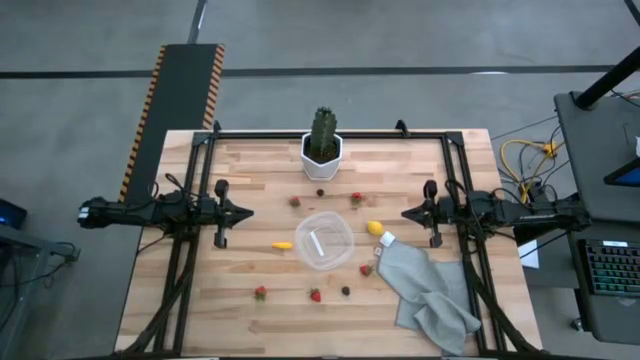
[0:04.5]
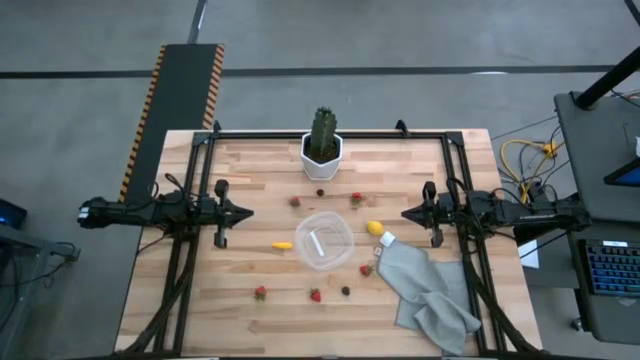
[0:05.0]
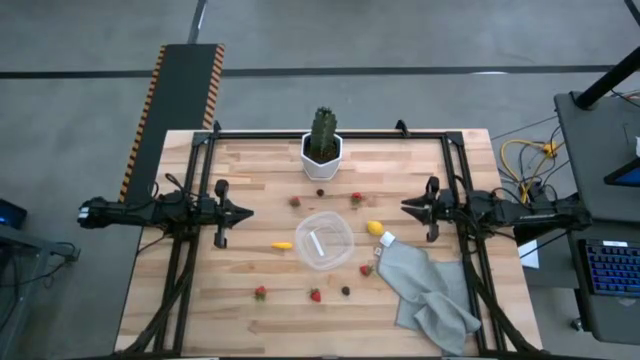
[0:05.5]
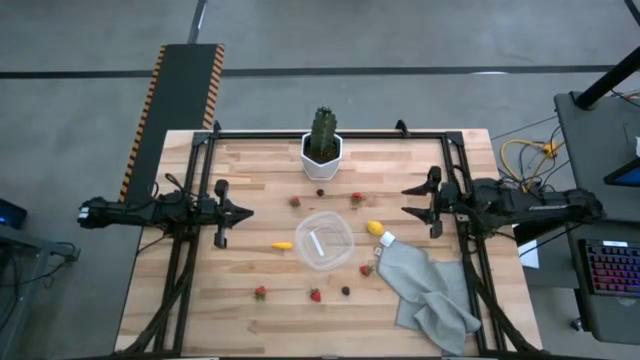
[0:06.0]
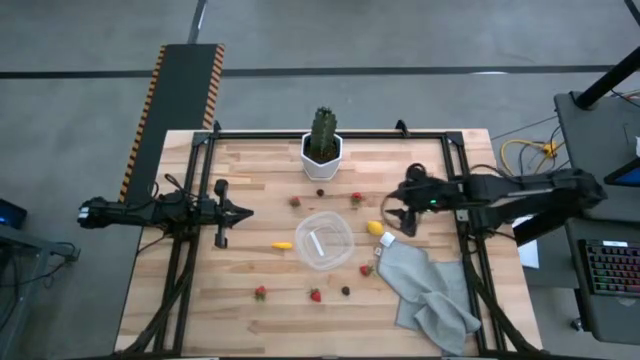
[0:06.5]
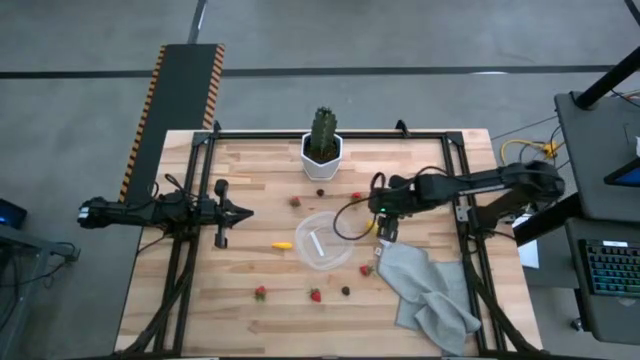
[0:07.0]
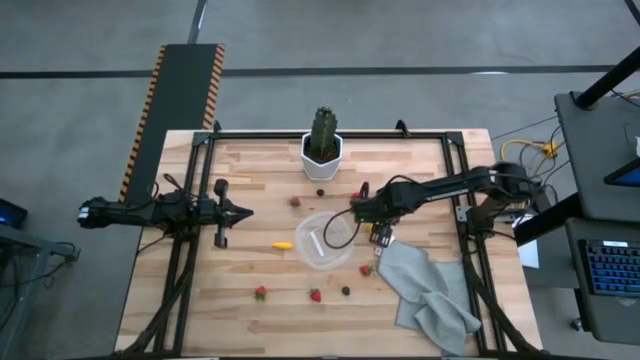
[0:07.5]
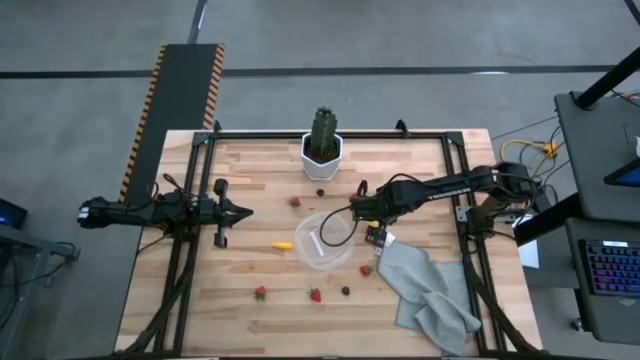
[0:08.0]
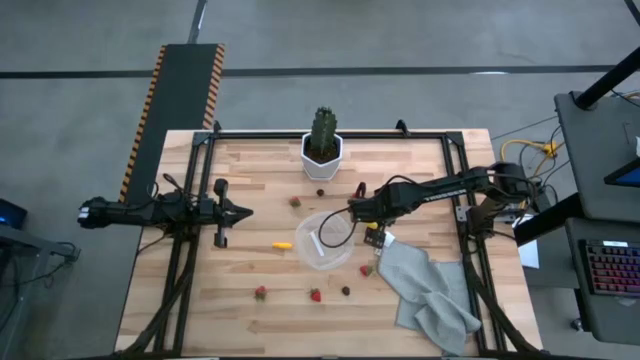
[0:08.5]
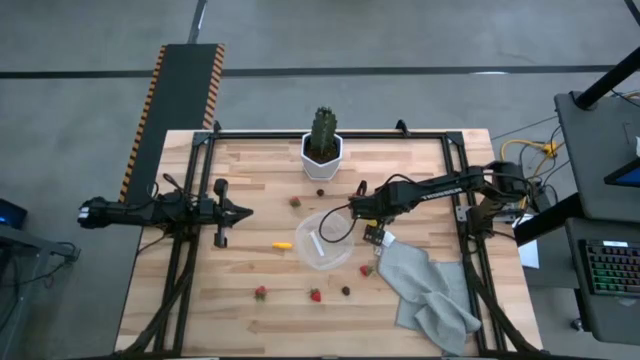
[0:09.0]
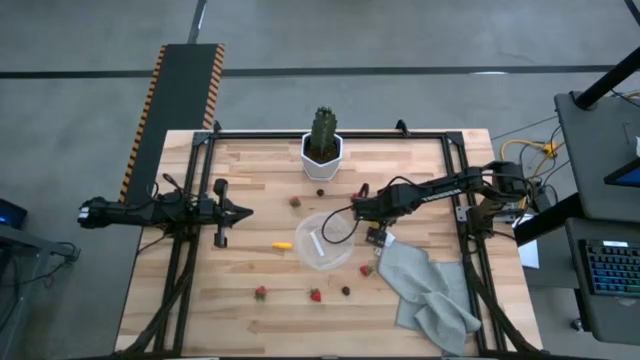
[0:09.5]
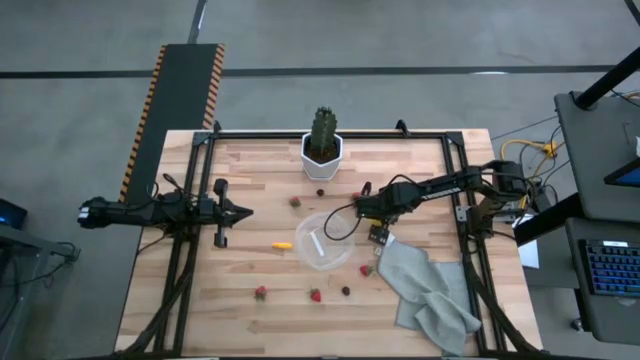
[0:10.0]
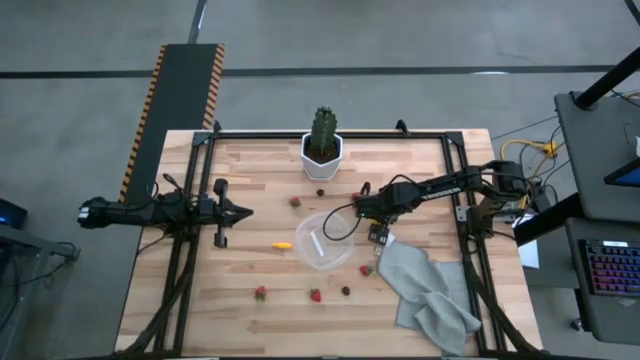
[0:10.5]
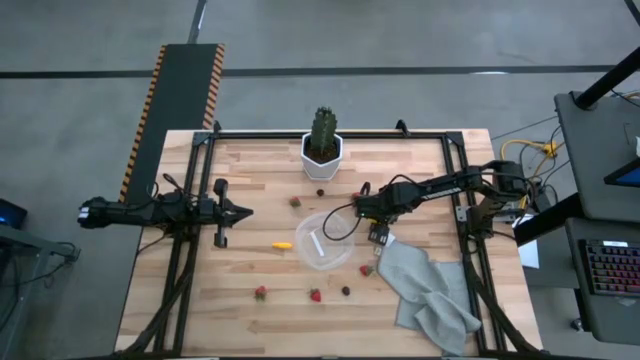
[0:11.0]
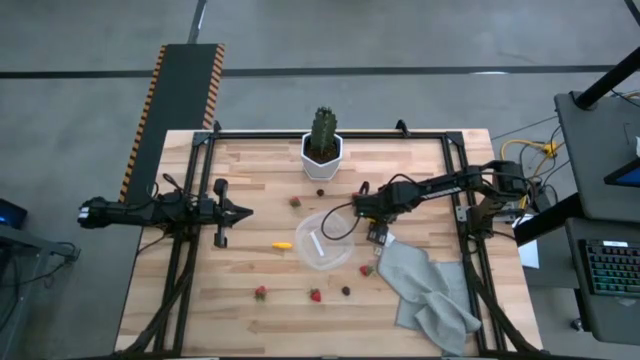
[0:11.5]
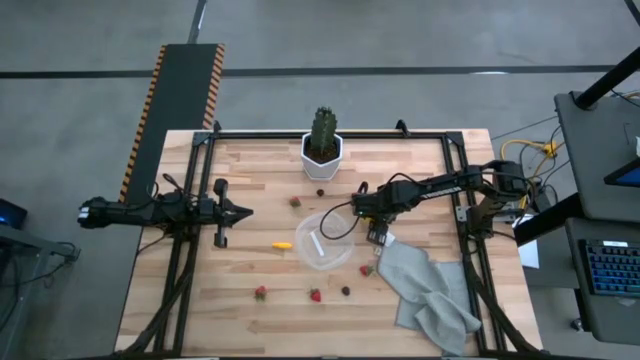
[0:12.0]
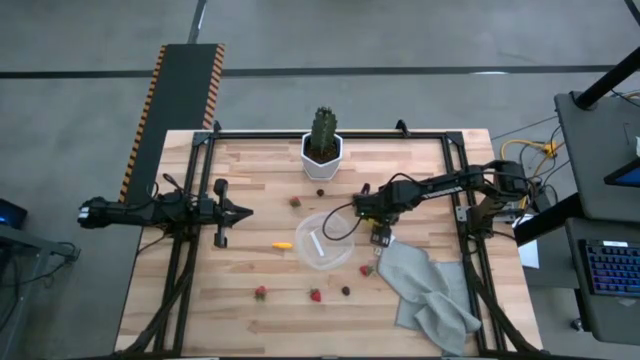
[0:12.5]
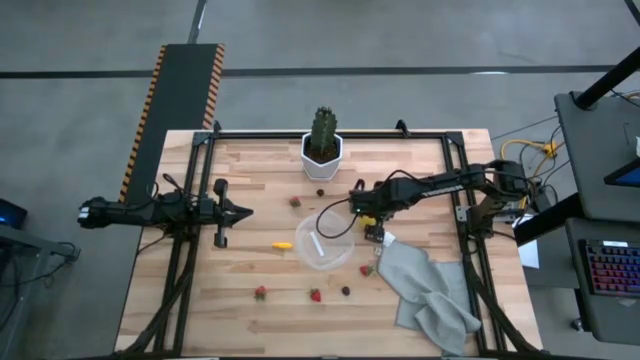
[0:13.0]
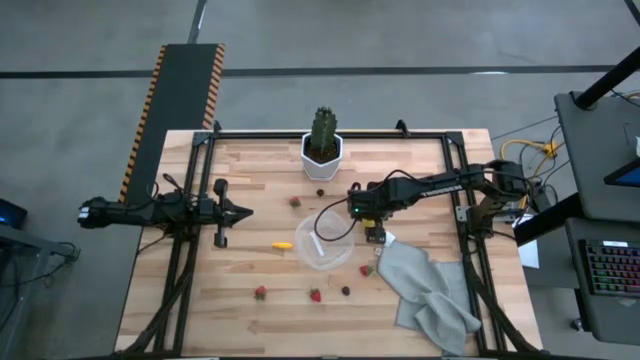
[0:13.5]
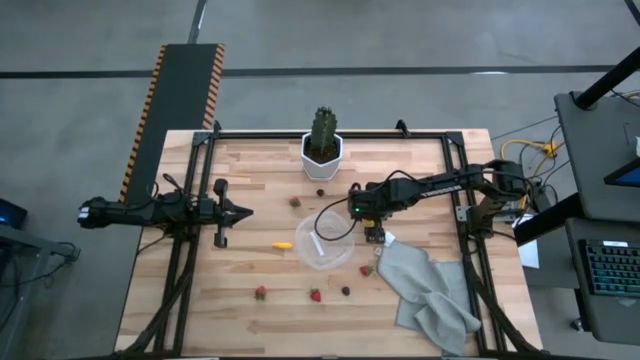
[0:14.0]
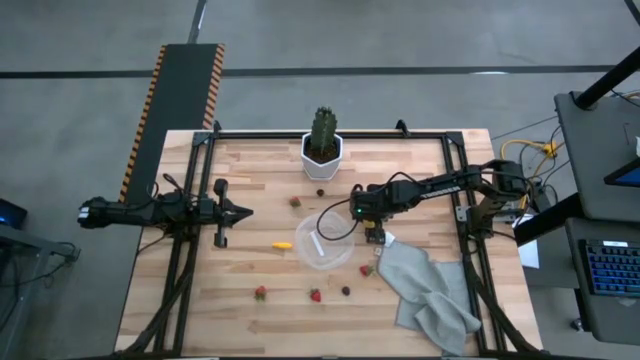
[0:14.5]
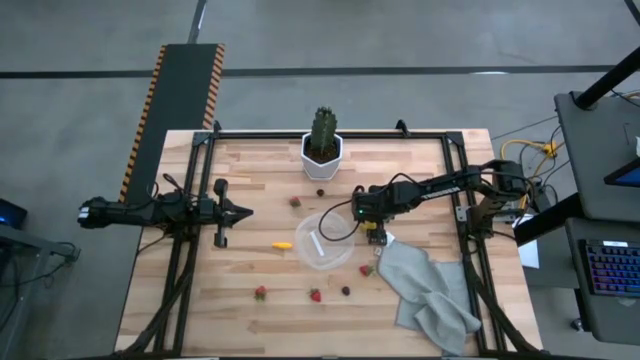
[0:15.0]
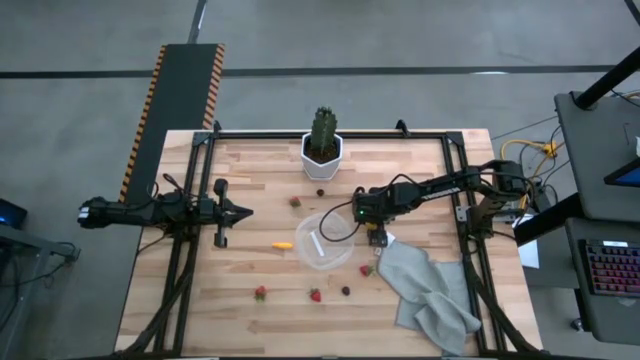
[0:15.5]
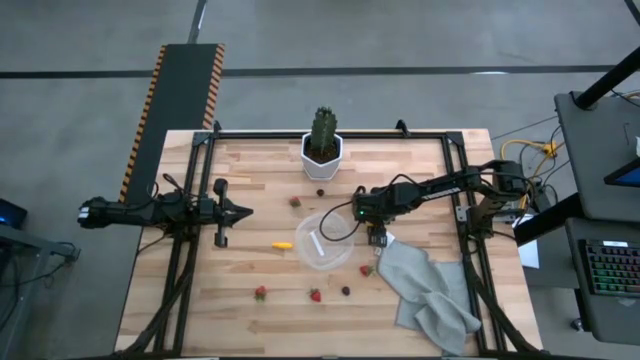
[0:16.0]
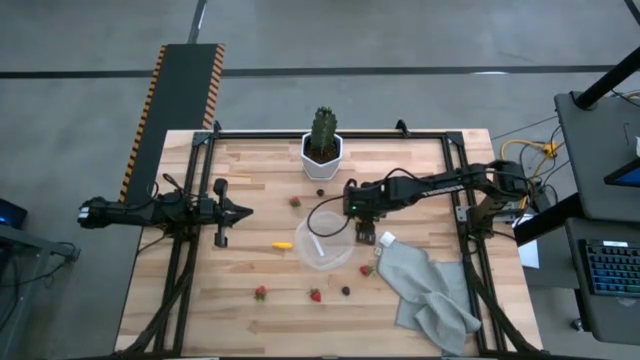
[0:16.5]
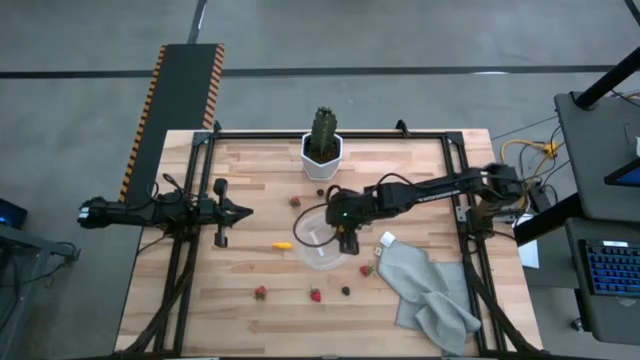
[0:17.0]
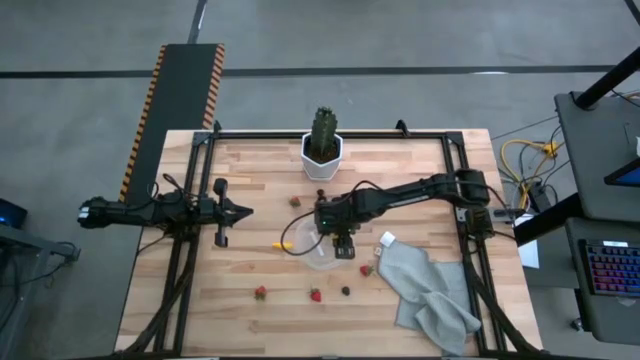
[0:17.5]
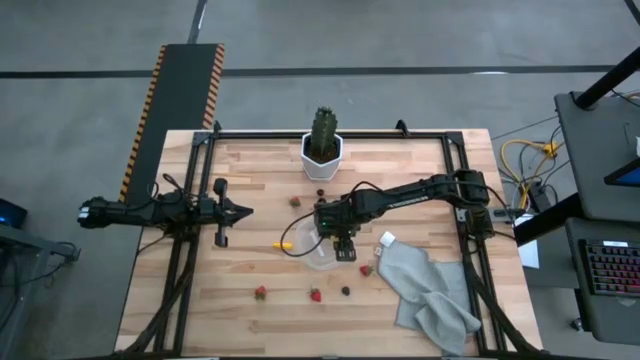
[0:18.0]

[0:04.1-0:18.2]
Task: Pick and placing Produce into tupperware
Put the yellow lemon into the transparent container

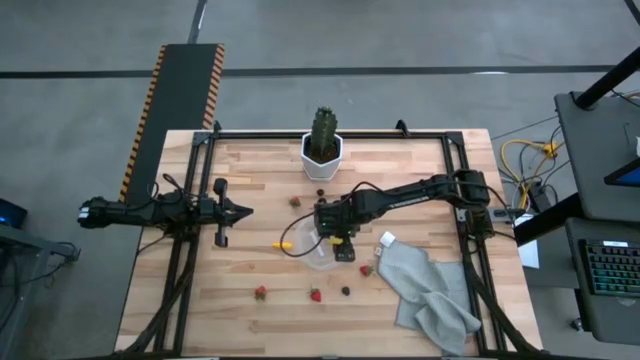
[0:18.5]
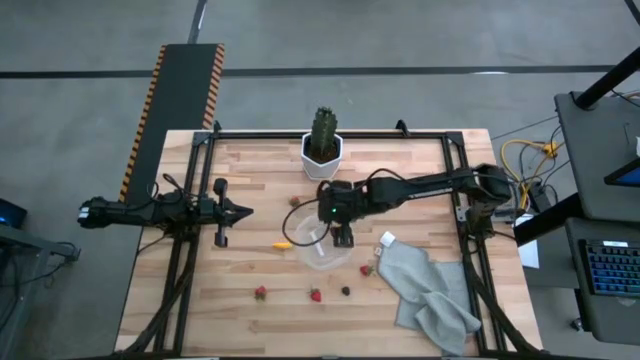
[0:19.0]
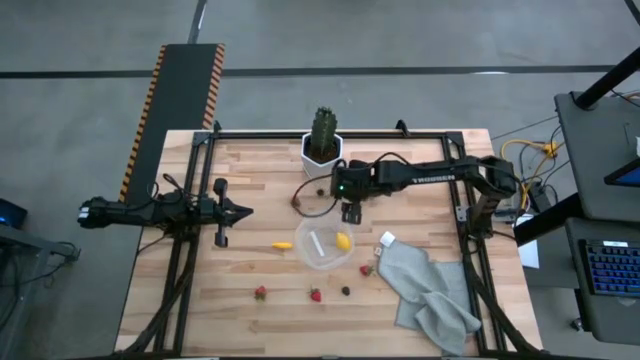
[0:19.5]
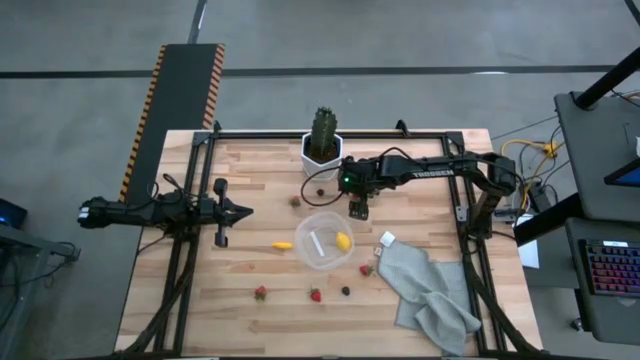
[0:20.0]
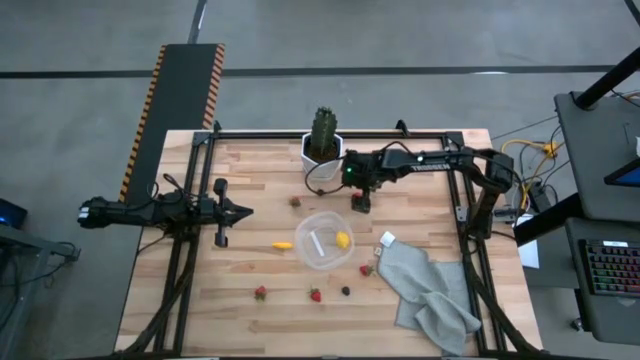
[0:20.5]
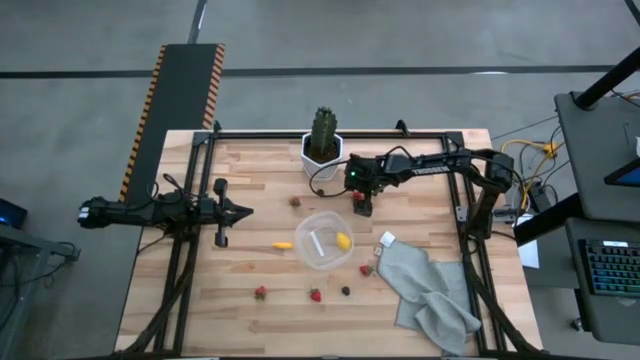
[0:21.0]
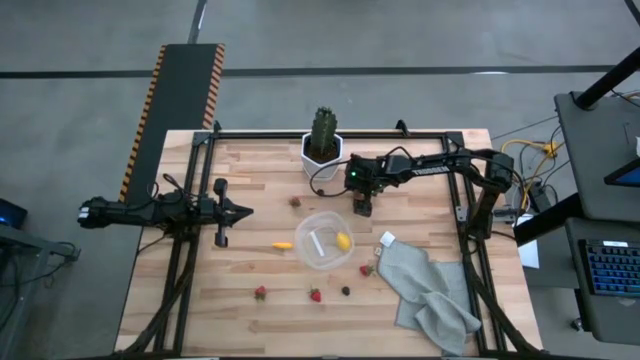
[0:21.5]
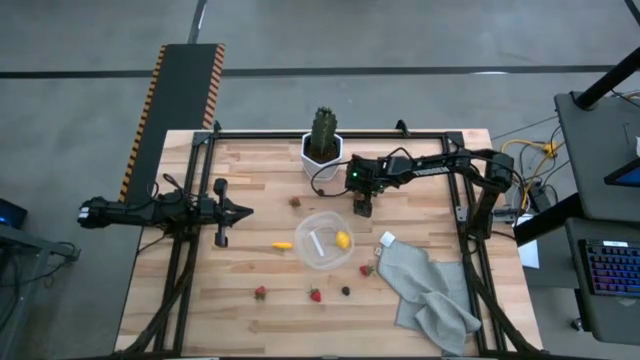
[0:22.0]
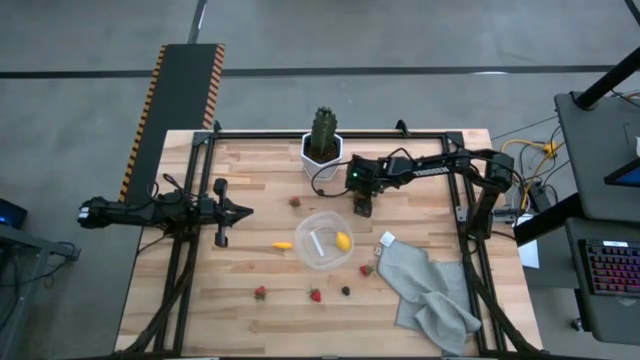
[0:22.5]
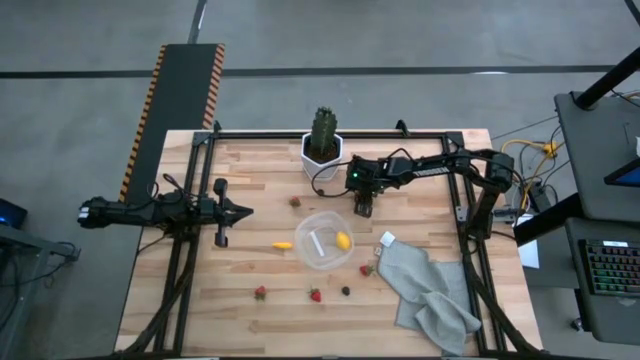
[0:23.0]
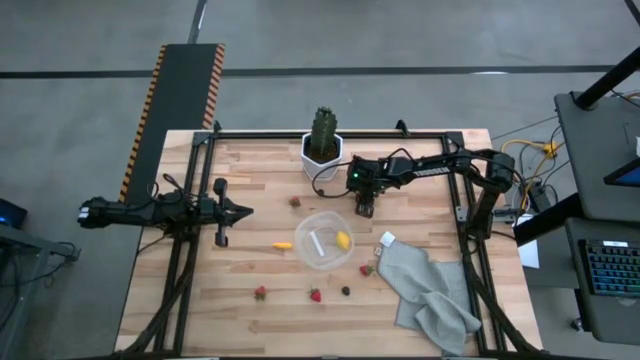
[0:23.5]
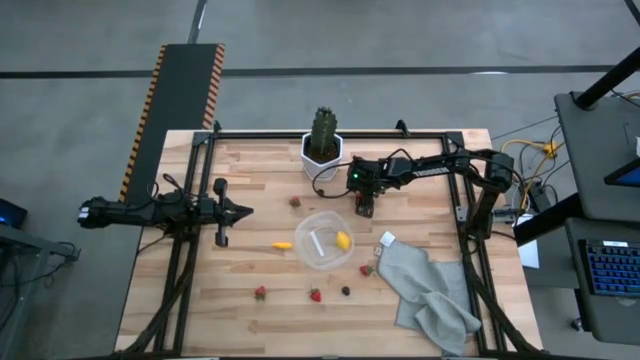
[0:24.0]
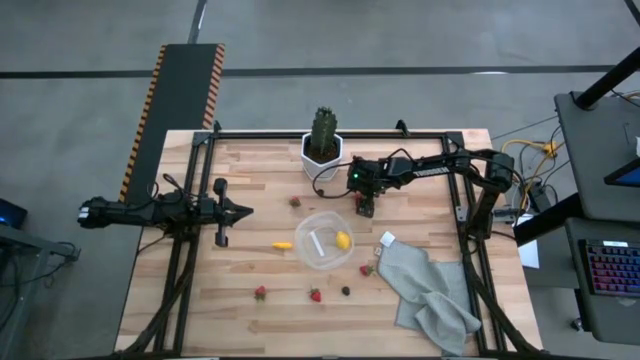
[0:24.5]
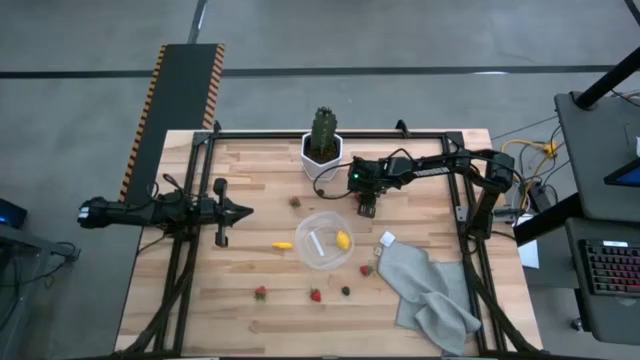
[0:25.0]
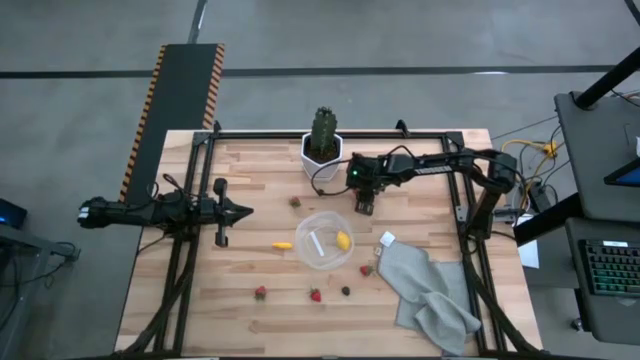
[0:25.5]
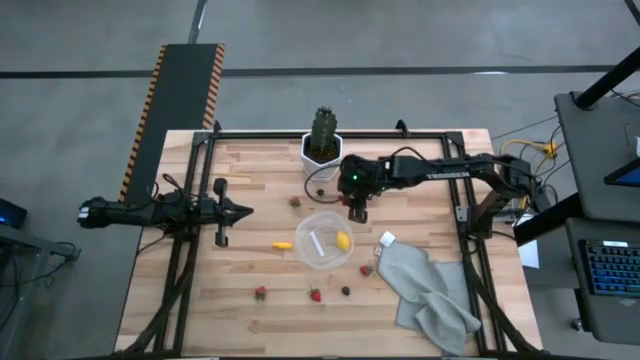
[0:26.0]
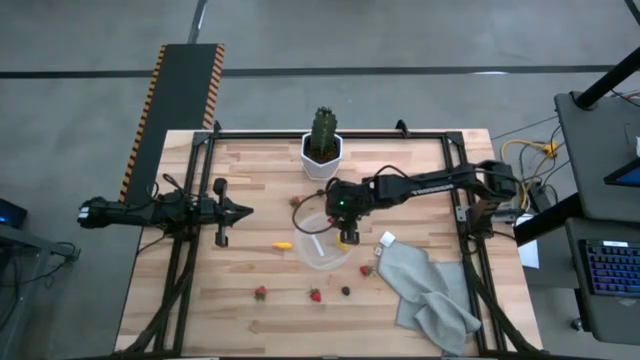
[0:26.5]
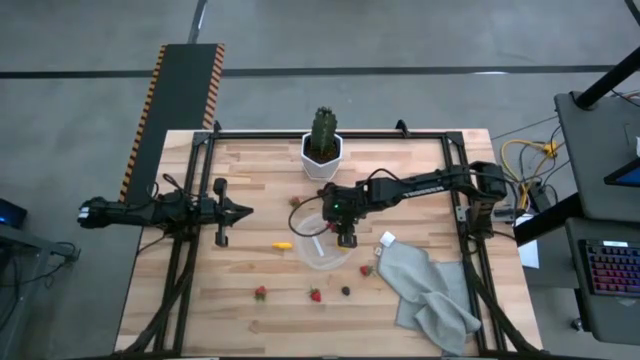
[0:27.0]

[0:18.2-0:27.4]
Put the red strawberry into the transparent container
